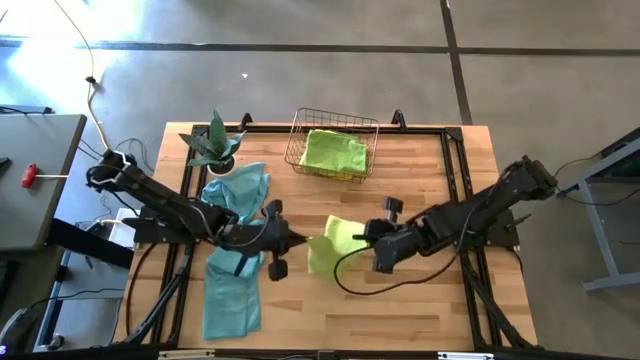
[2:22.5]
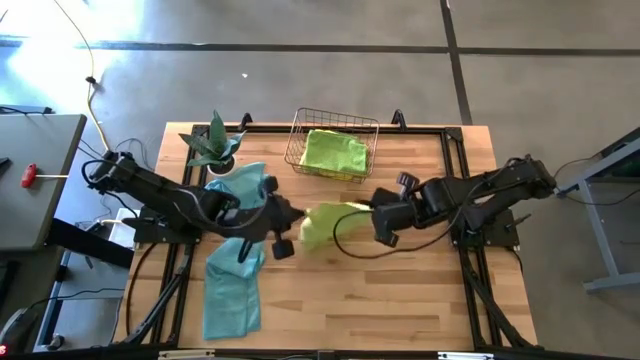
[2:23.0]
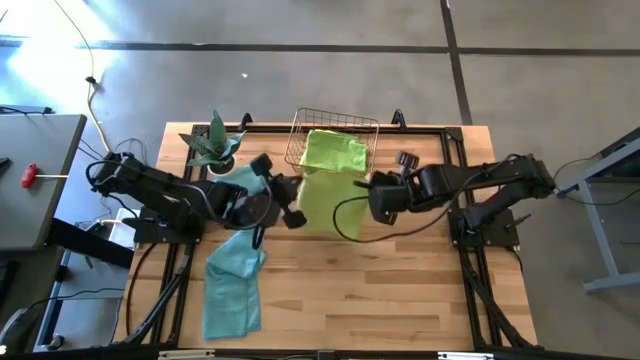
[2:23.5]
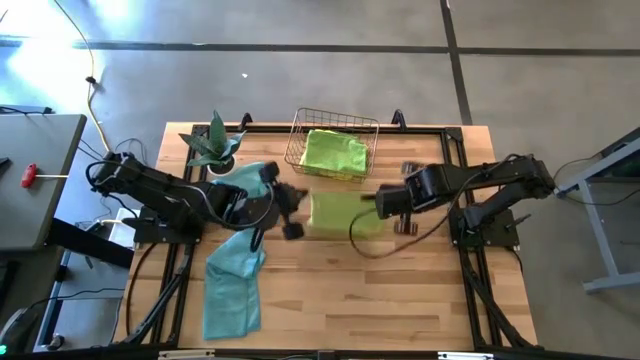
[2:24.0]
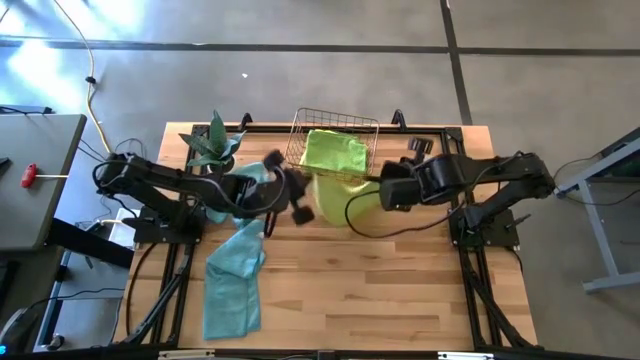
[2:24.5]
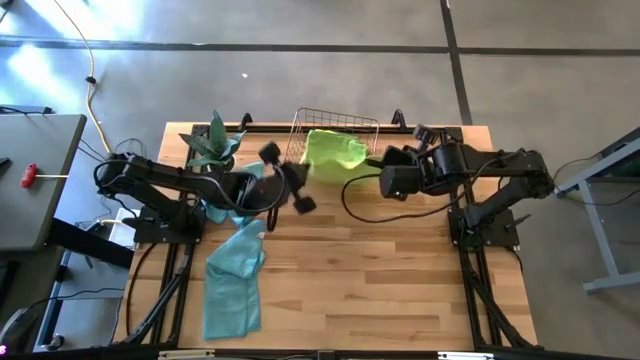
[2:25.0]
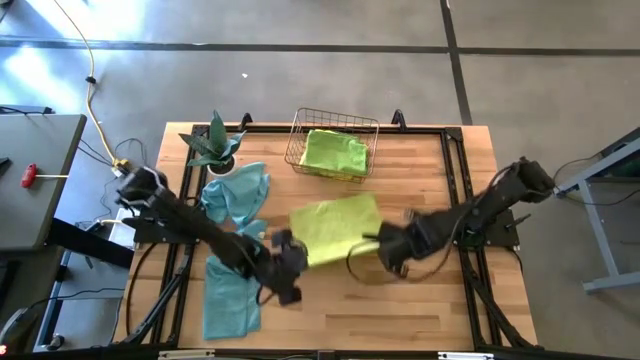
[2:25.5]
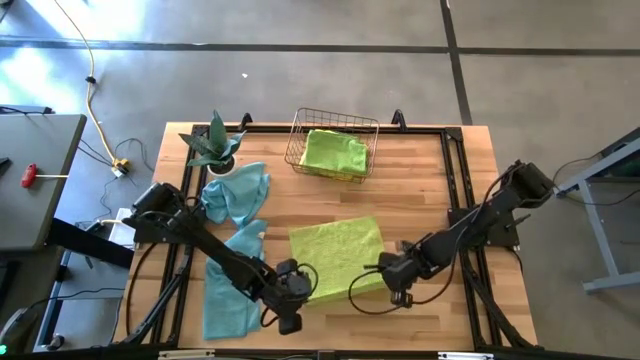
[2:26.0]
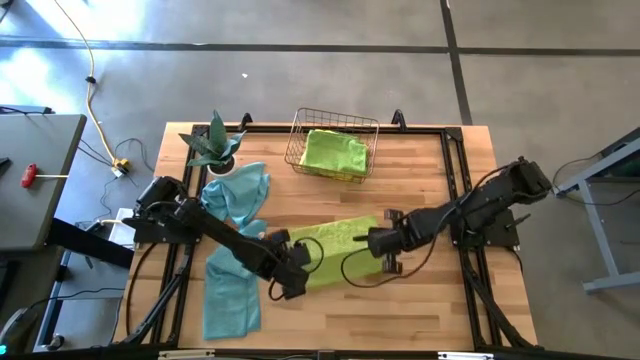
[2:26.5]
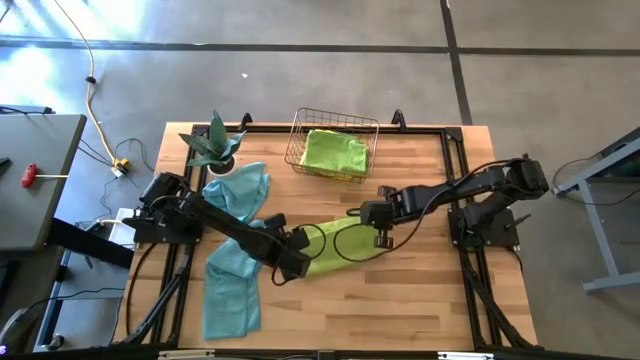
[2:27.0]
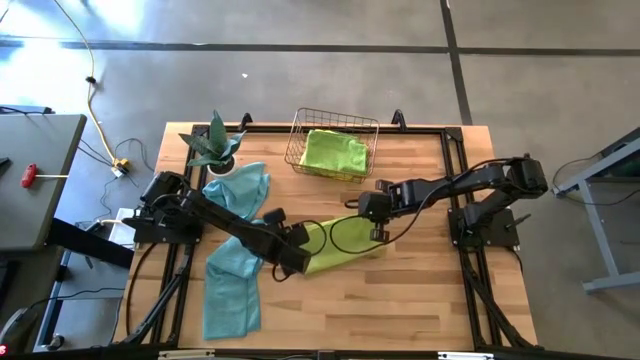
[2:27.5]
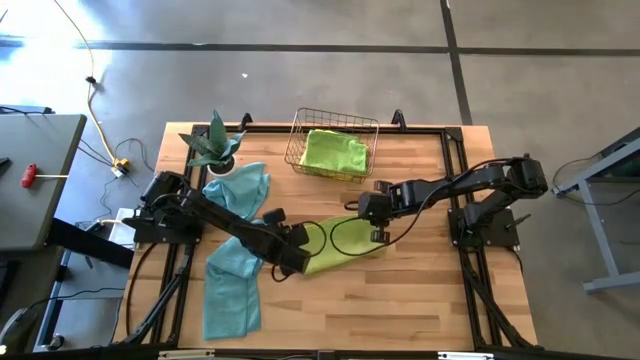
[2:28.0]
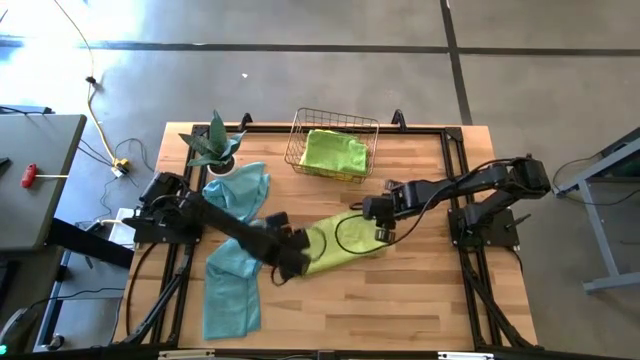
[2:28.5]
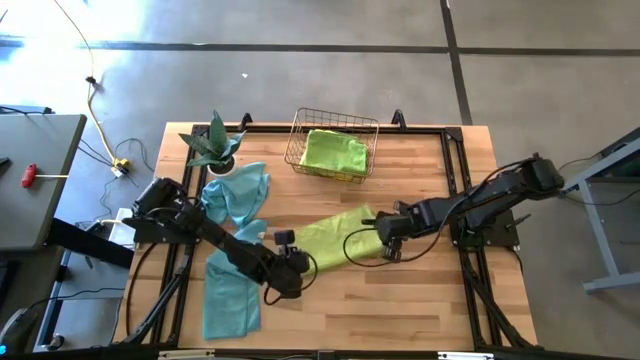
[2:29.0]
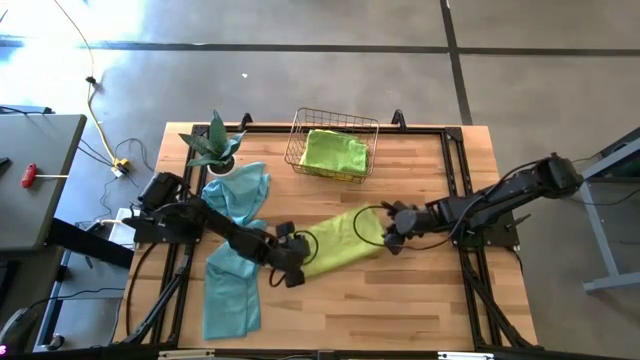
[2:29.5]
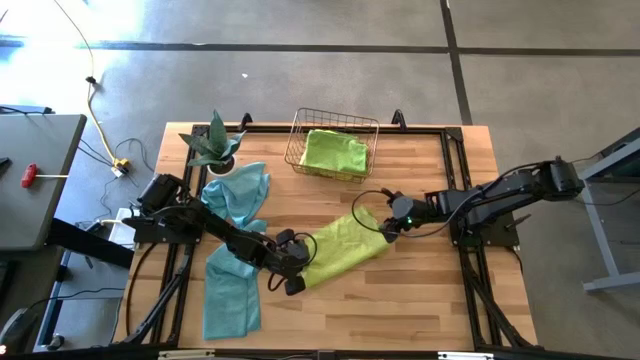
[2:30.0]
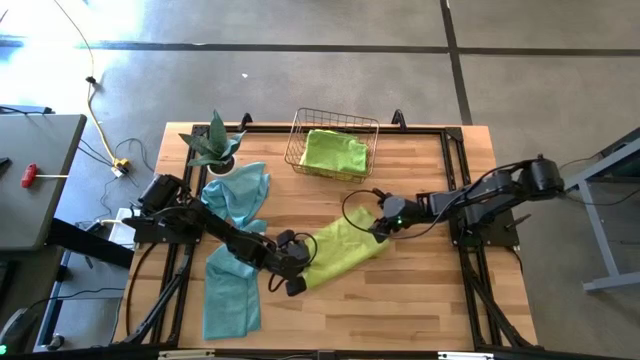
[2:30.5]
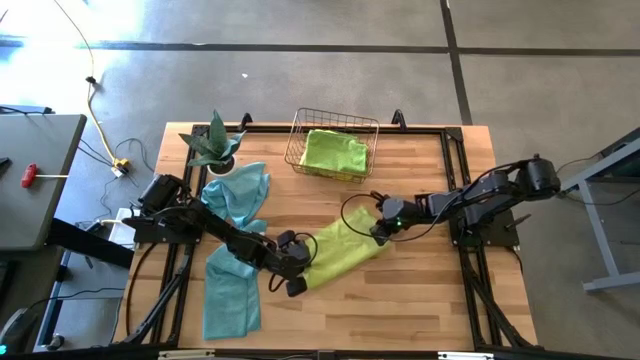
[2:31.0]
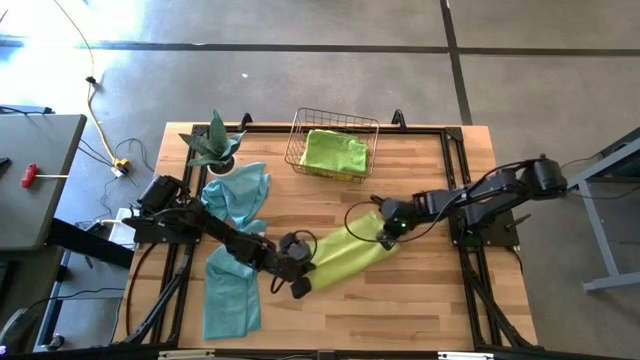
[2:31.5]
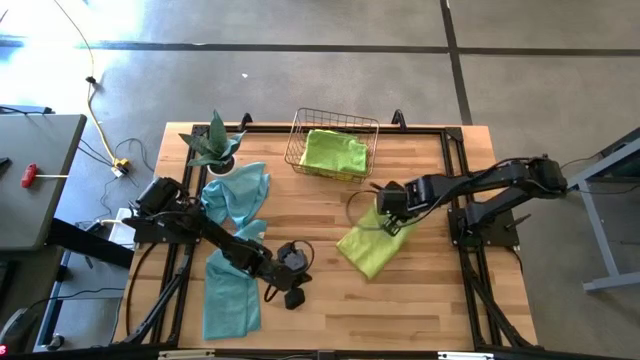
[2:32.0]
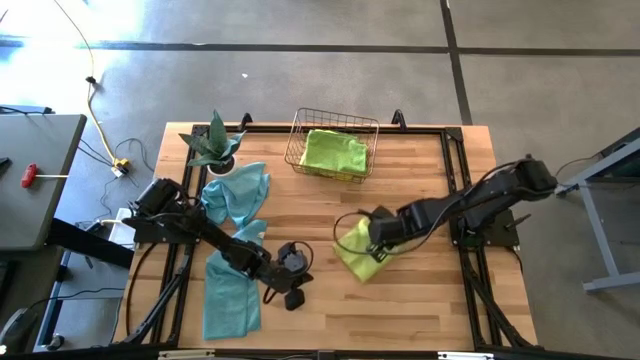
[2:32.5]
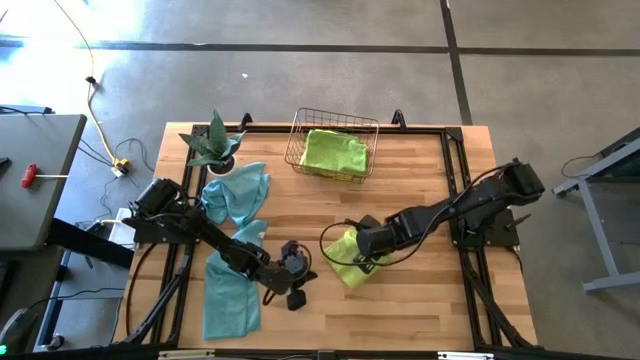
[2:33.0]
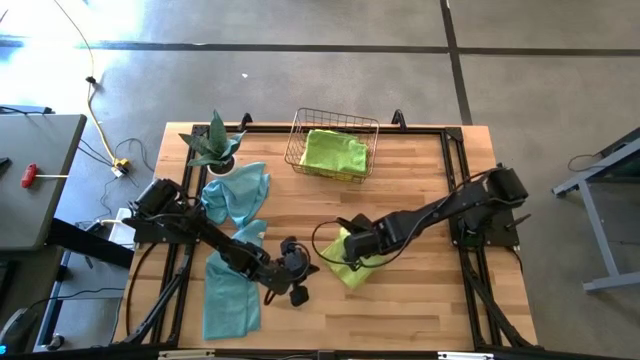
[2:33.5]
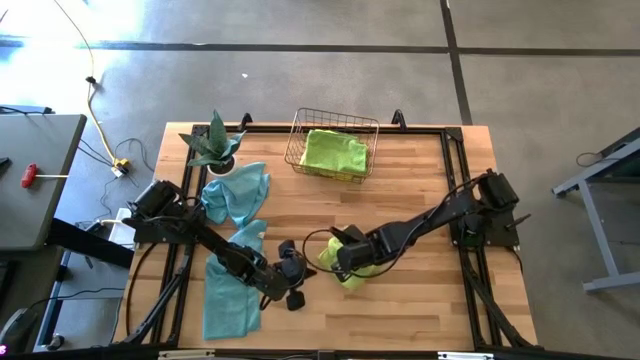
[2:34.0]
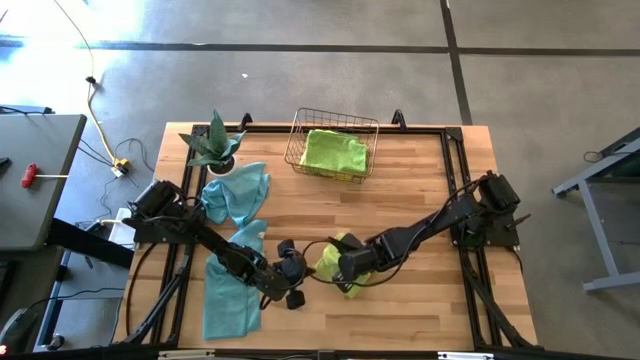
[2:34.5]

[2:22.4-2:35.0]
Task: Fold microfiber towels
Fold the light green microfiber towel

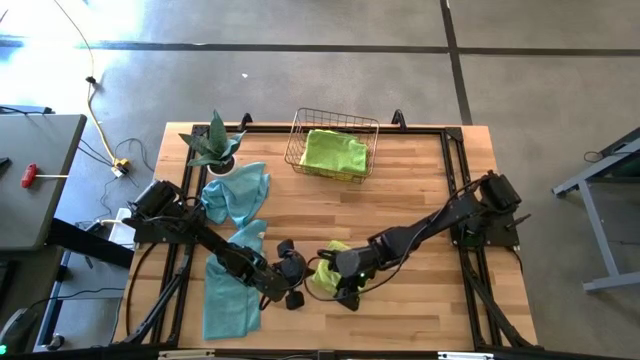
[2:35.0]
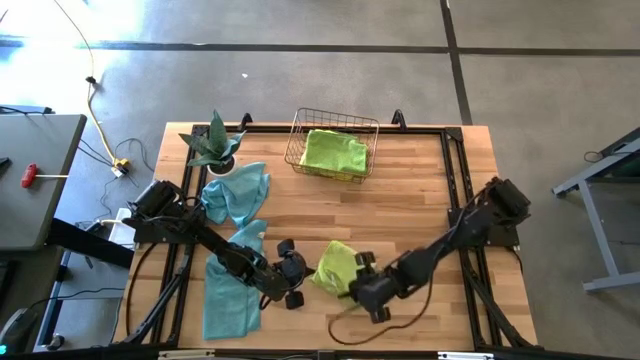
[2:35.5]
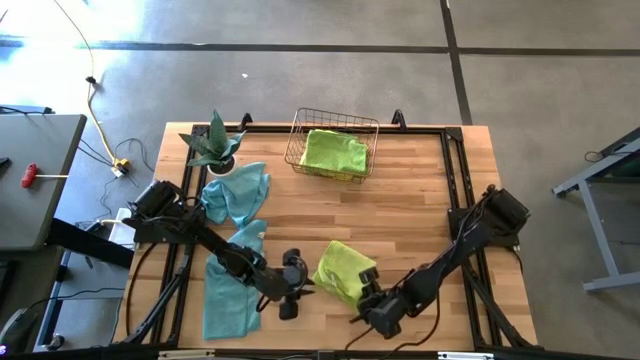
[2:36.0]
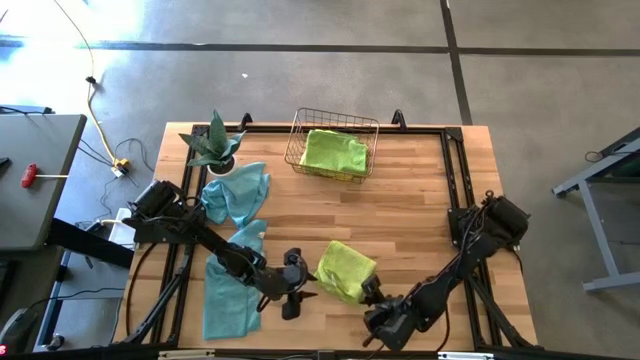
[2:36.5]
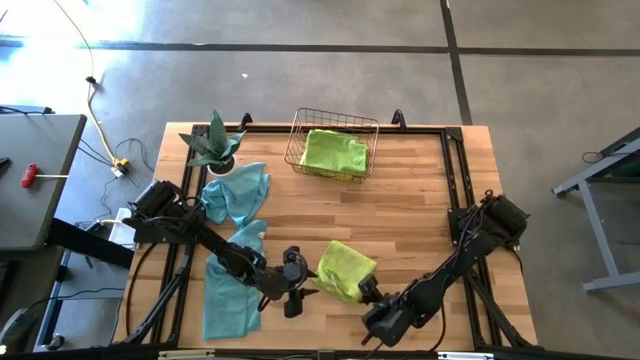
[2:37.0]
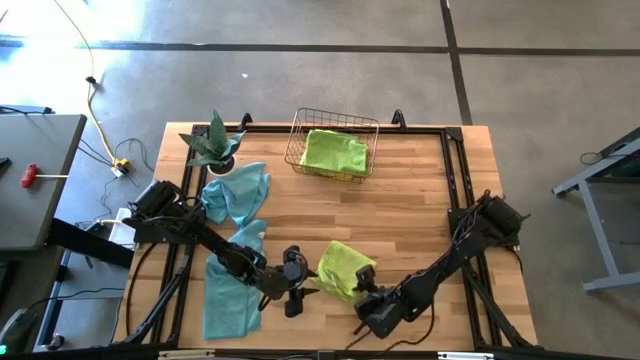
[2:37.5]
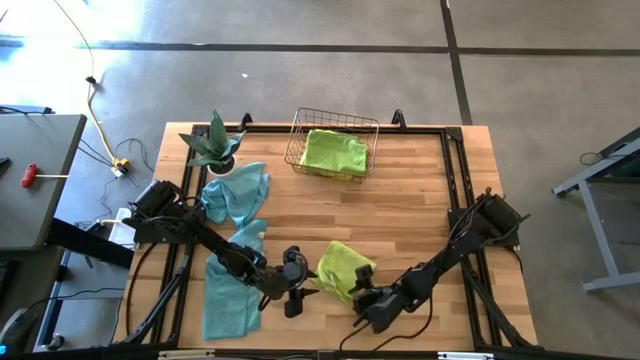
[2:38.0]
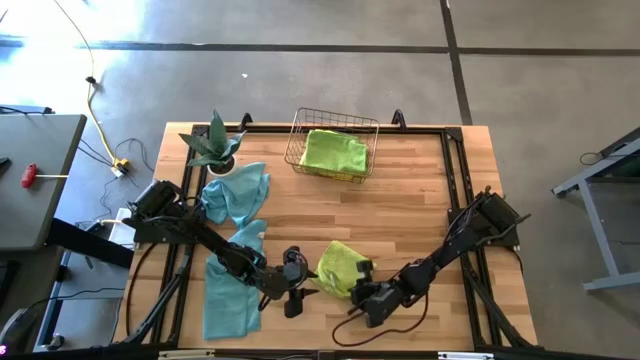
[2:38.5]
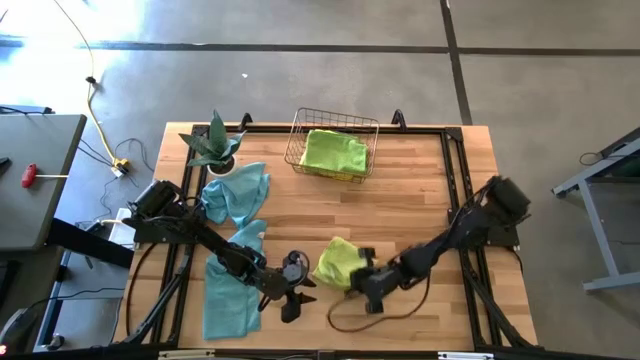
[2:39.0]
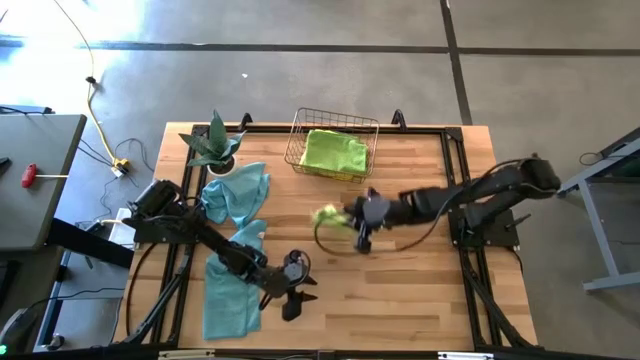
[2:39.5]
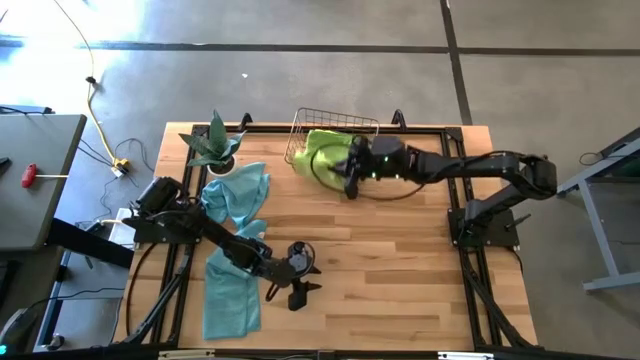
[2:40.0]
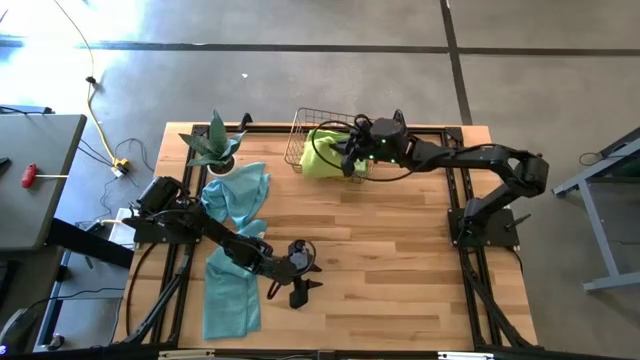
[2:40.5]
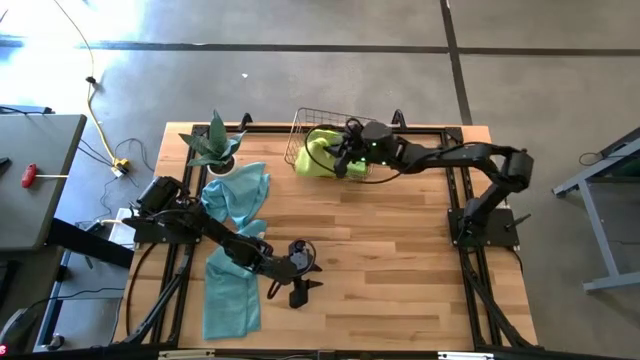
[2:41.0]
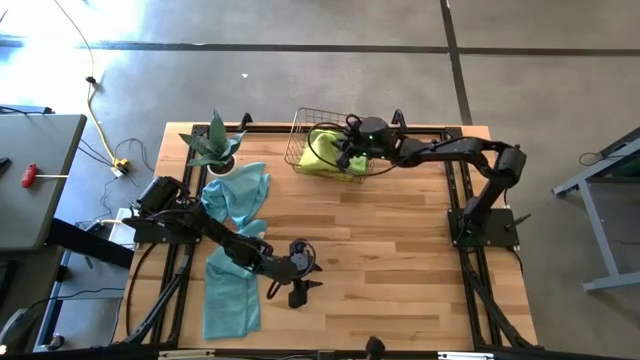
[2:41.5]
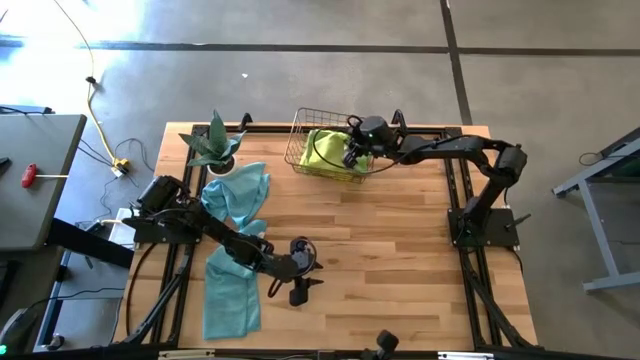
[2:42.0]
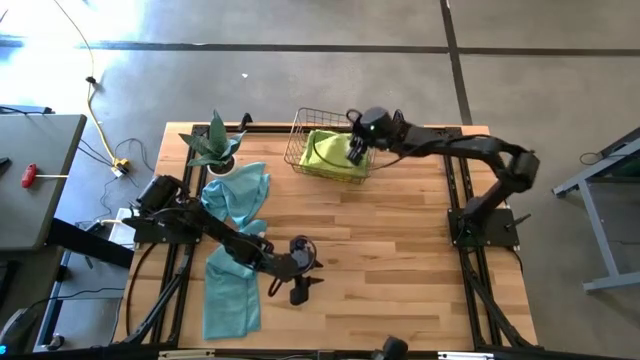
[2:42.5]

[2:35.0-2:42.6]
Put the light green microfiber towel into the wire basket
